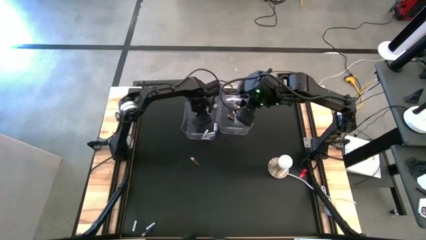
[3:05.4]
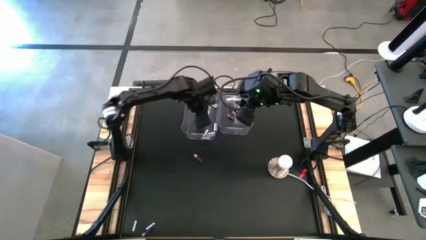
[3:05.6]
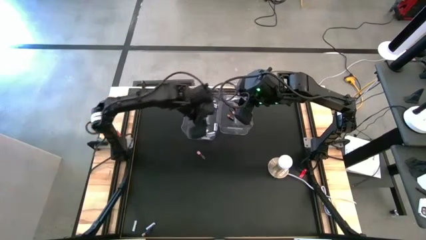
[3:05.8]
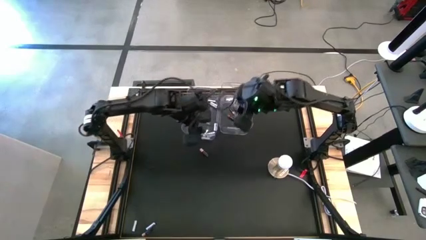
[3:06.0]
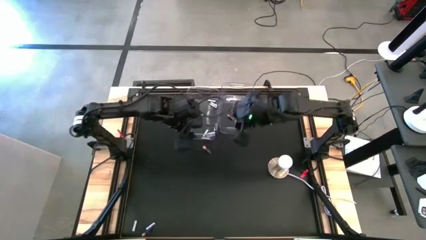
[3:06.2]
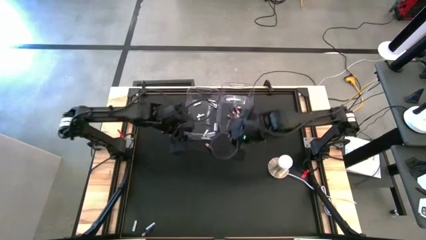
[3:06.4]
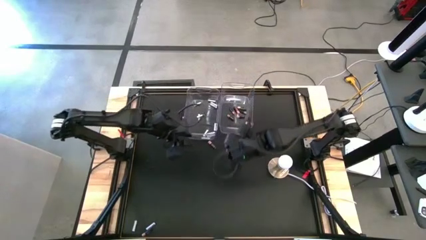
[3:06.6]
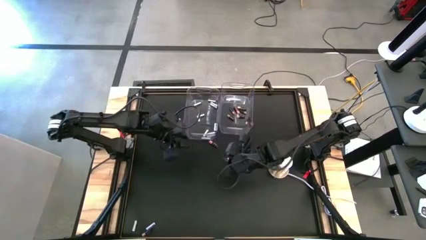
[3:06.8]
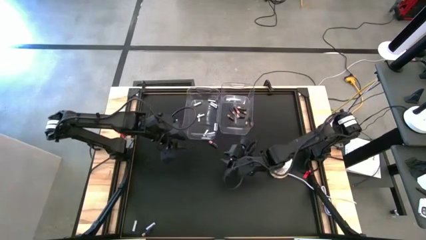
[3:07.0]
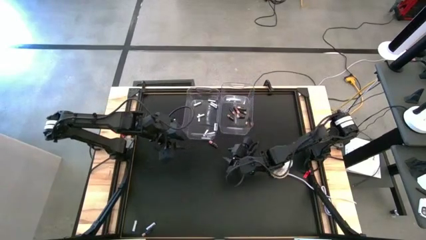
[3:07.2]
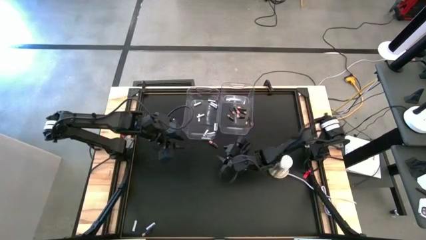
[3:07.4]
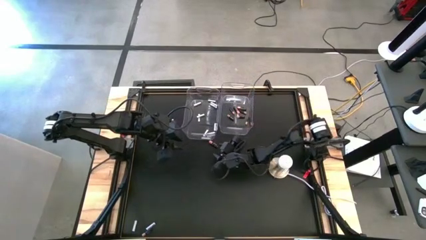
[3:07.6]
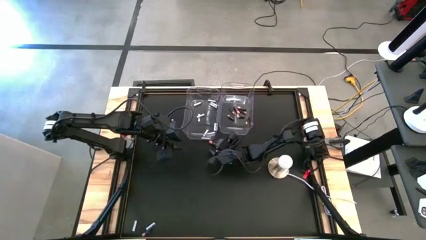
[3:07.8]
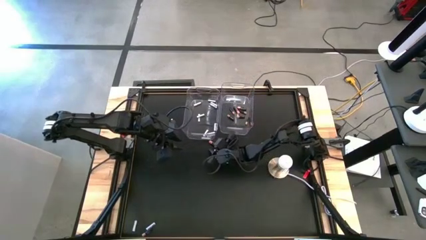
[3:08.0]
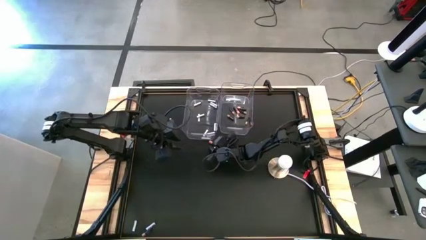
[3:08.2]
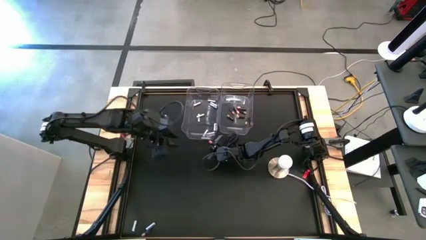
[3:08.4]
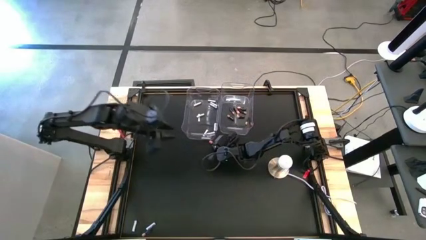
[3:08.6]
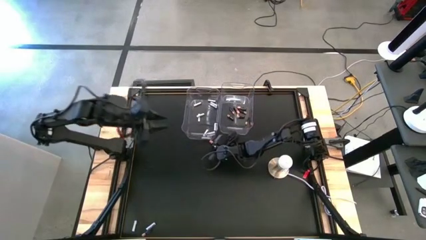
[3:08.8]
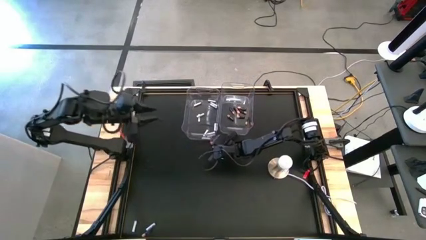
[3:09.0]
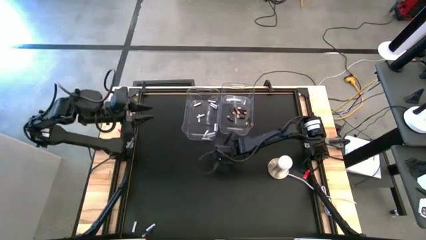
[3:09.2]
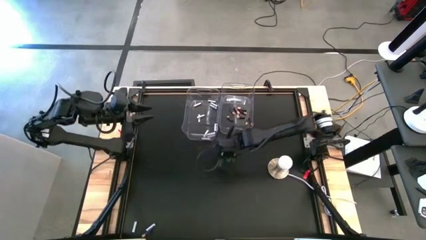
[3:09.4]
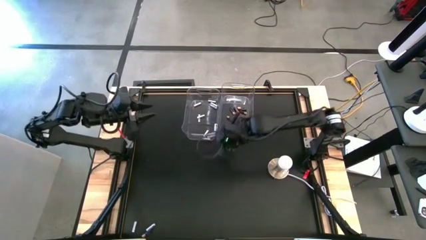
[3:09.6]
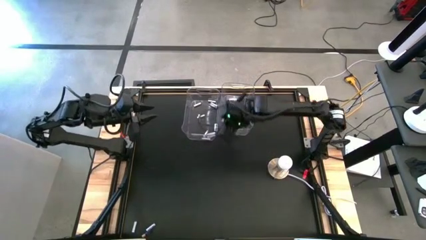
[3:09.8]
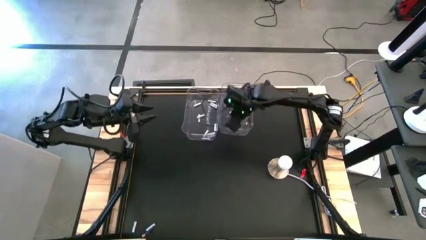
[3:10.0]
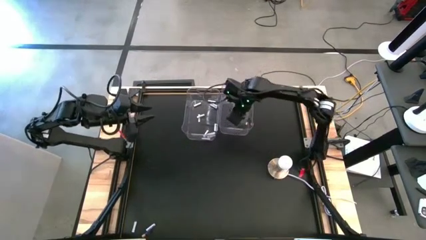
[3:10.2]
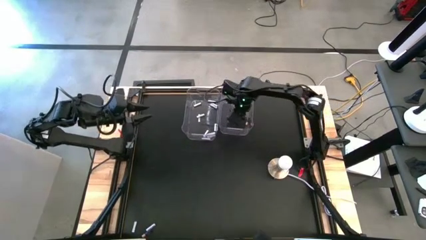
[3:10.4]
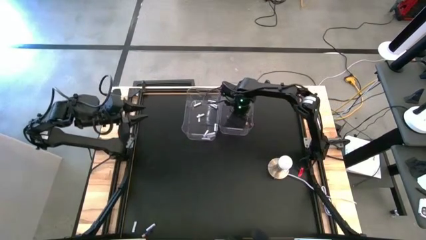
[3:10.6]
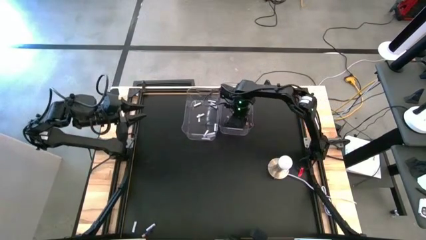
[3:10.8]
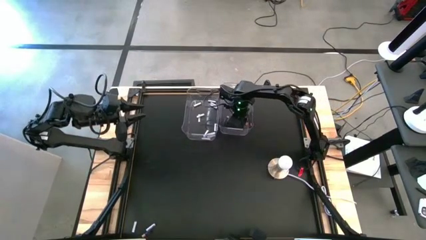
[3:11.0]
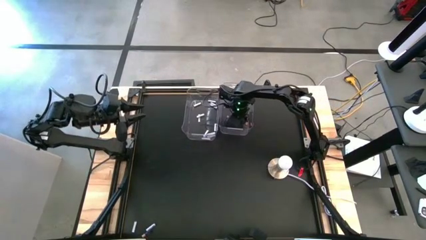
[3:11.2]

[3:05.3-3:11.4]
Task: Sort batteries
Put the black battery into the right transparent bin

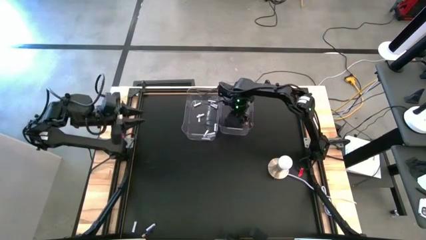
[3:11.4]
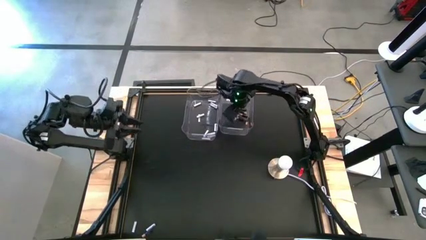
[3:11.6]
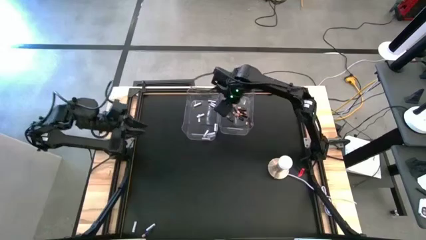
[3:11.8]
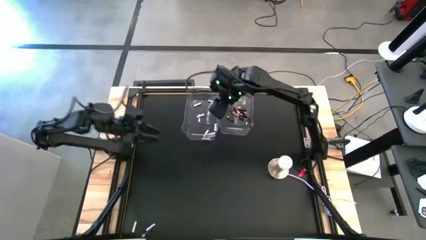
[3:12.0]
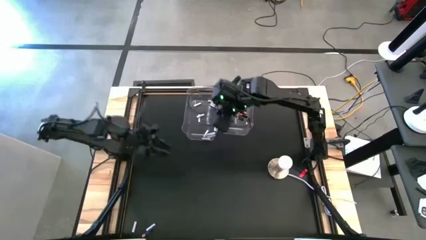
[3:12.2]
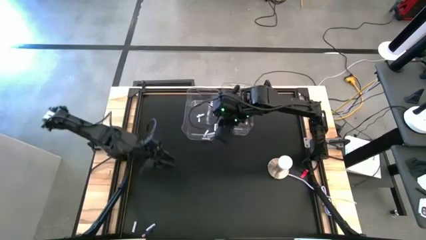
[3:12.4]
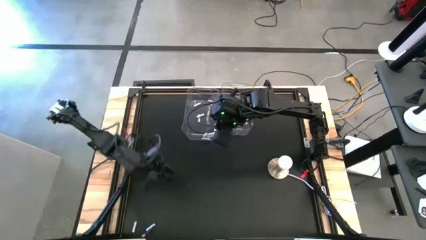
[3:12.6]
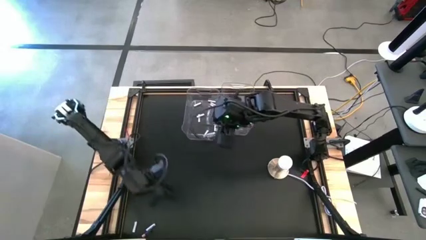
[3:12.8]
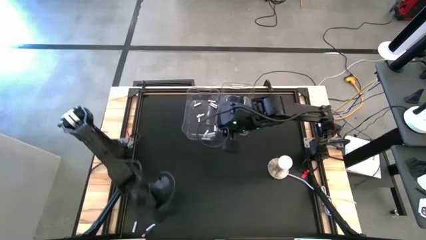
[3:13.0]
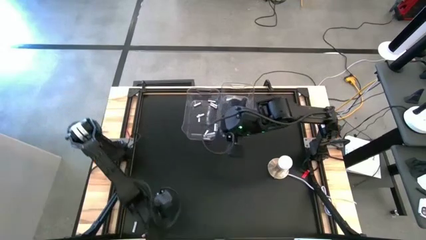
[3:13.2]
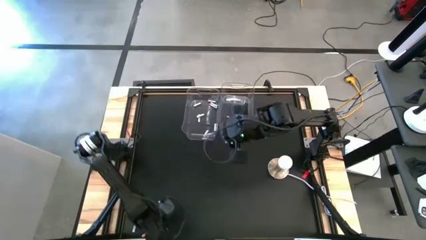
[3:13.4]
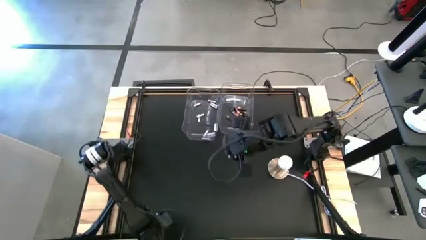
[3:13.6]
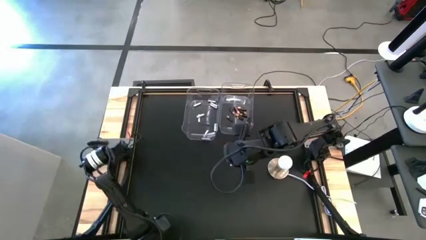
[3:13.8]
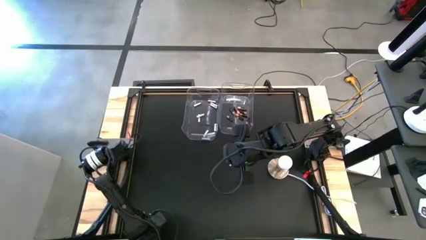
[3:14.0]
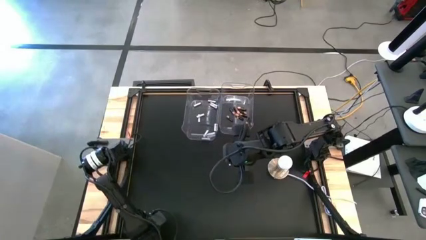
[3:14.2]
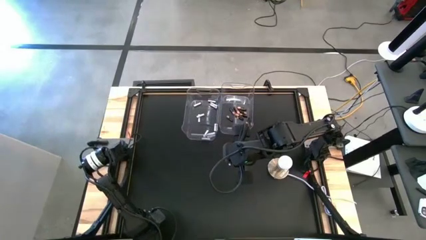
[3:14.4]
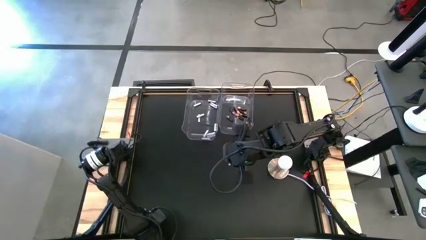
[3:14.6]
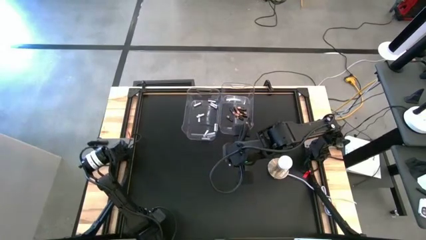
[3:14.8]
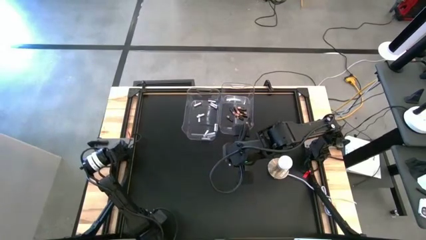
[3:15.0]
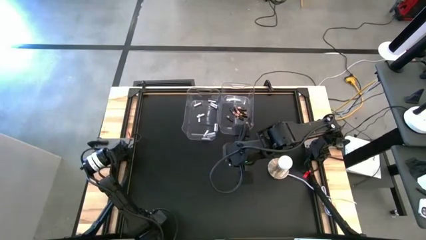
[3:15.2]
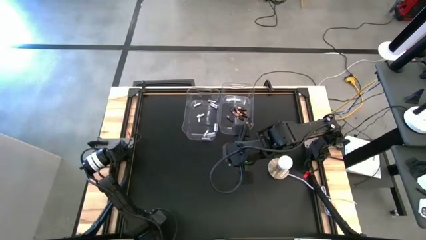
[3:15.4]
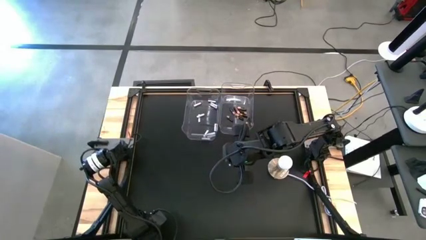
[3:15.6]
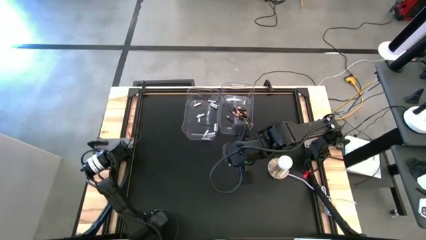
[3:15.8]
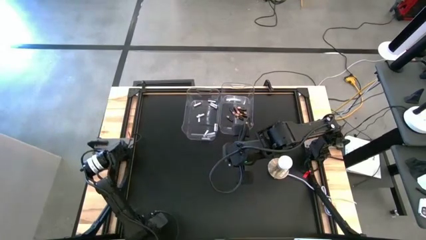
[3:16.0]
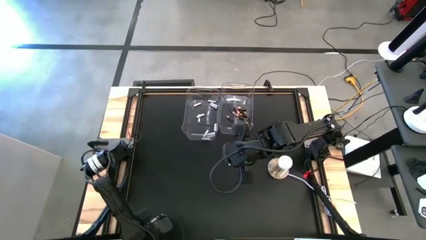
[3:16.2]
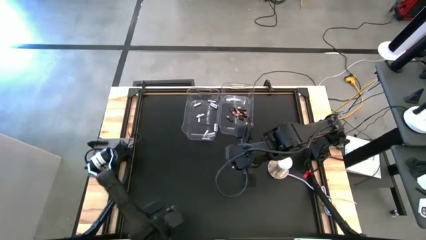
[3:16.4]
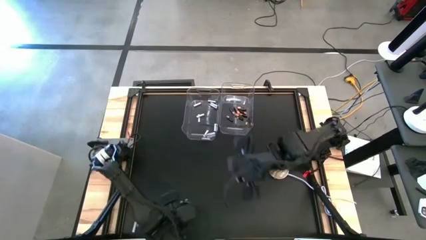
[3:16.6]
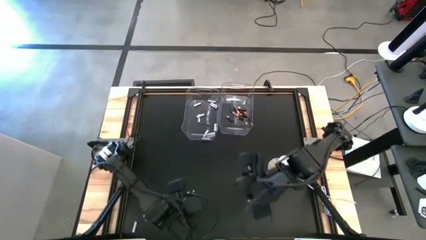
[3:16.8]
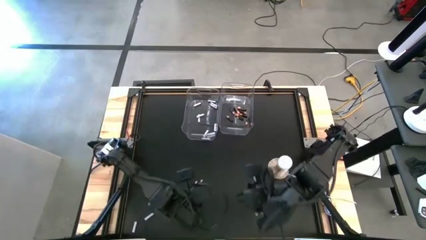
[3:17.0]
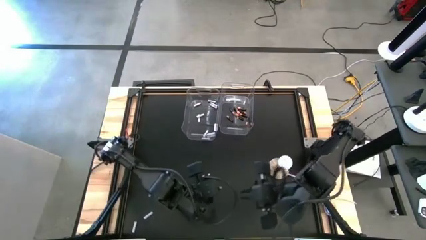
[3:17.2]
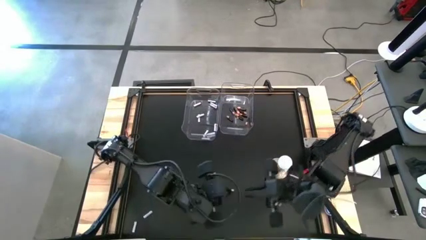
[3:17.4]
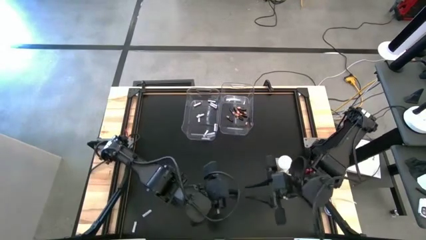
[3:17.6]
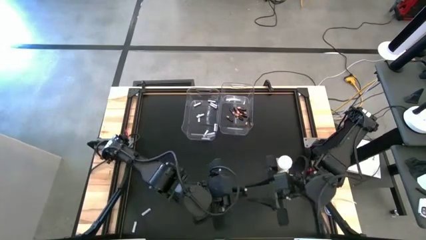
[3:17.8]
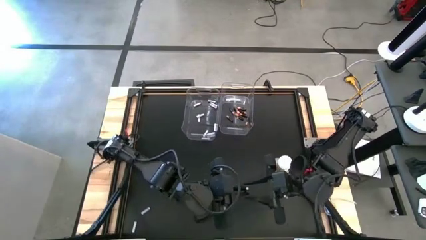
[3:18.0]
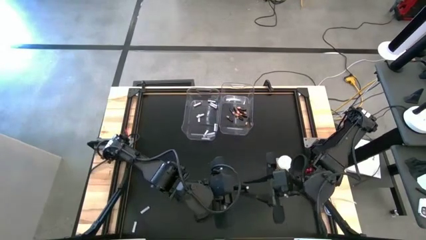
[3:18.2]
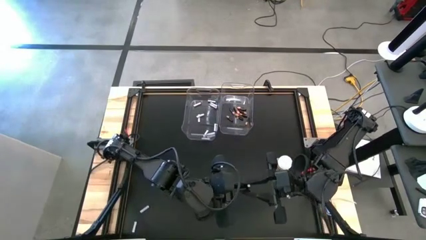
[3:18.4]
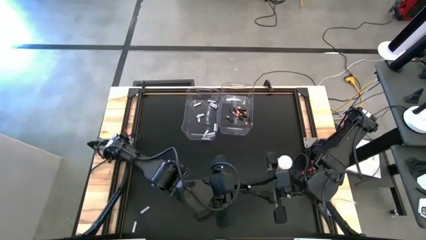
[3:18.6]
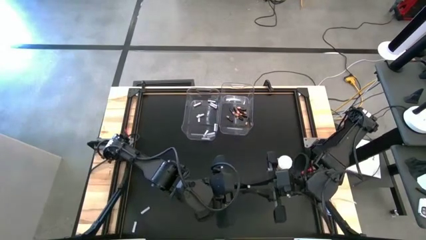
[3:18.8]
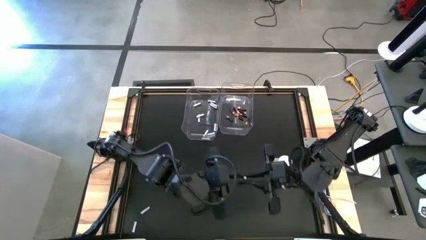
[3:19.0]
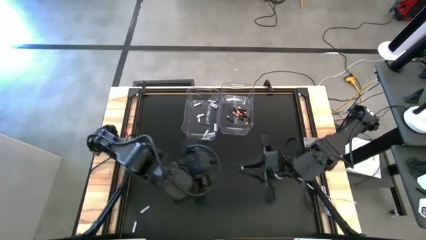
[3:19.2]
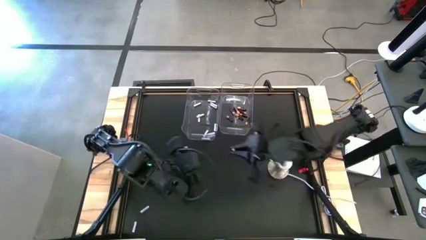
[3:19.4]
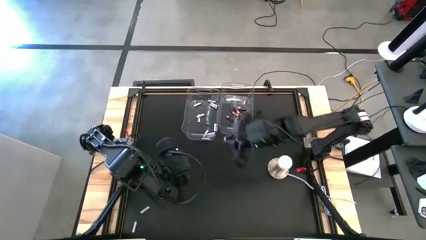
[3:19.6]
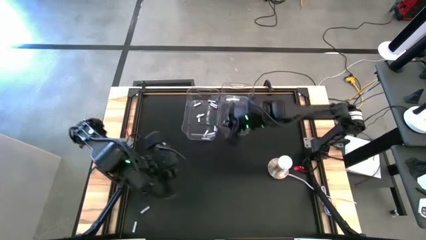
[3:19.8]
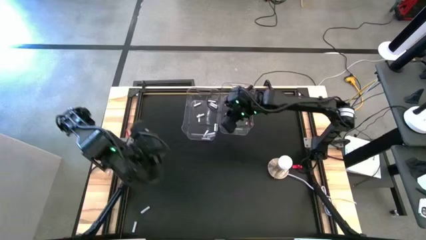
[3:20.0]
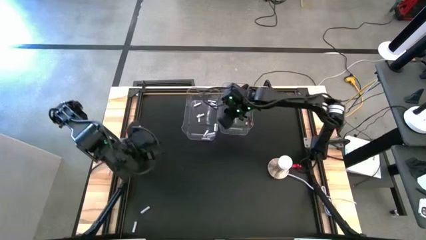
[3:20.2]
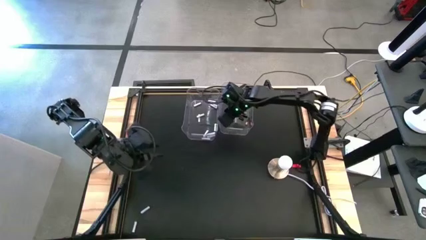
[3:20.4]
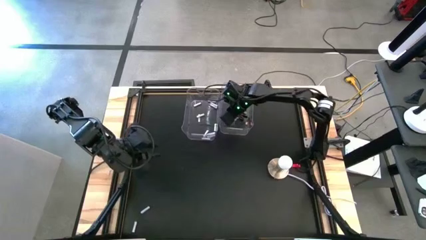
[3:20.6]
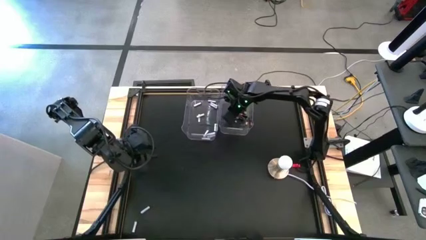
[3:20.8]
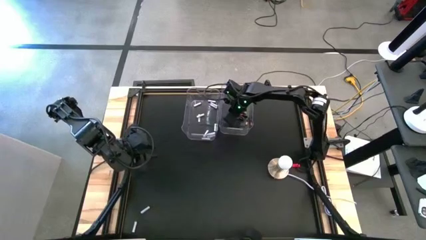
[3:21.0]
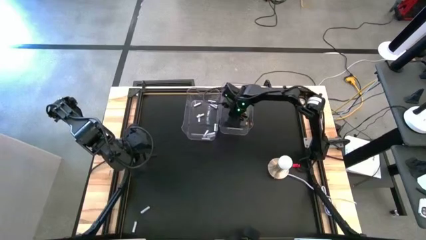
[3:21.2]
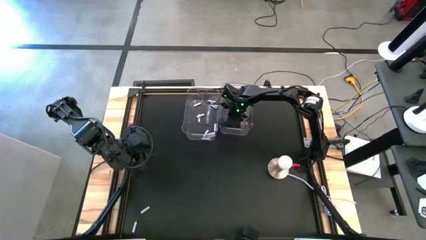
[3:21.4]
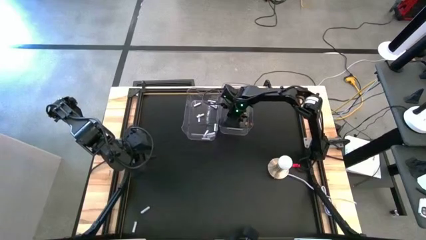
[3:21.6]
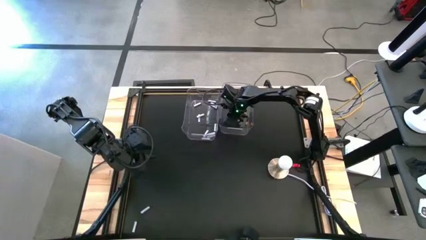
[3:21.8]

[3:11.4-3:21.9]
Put the black battery into the right transparent bin
